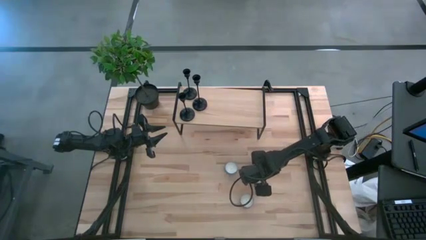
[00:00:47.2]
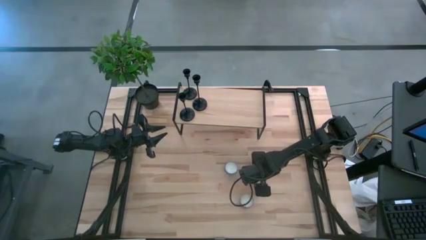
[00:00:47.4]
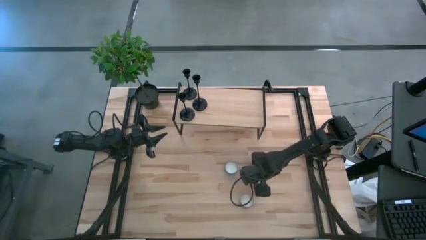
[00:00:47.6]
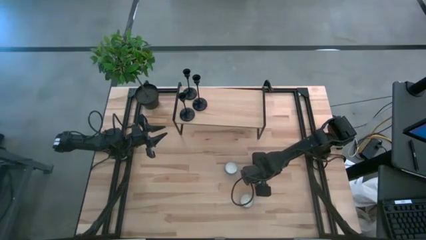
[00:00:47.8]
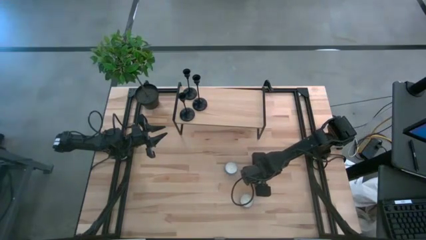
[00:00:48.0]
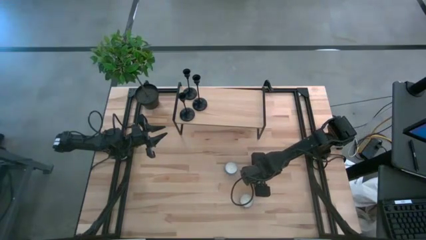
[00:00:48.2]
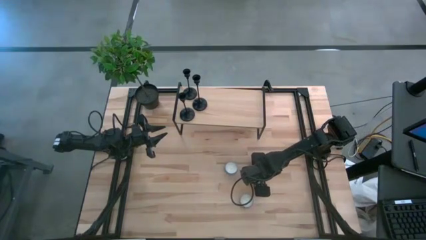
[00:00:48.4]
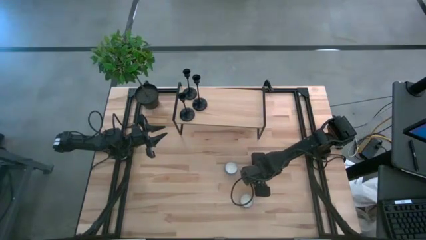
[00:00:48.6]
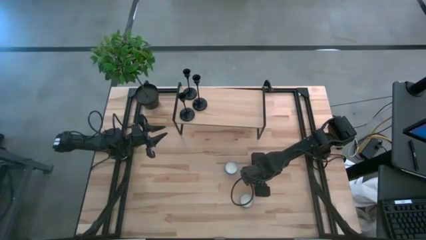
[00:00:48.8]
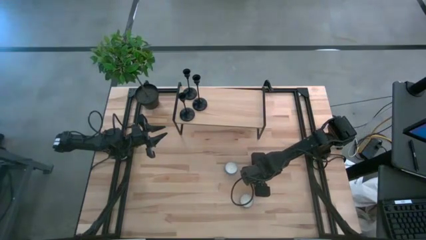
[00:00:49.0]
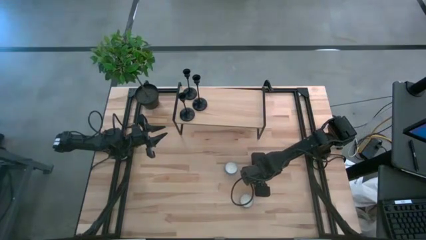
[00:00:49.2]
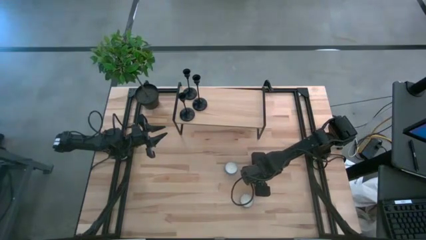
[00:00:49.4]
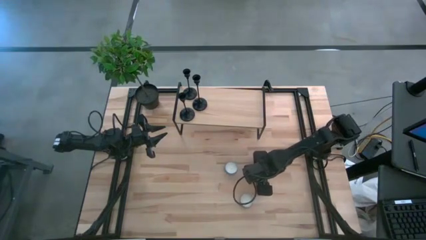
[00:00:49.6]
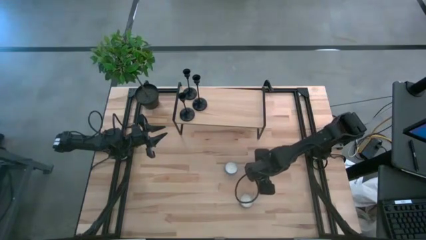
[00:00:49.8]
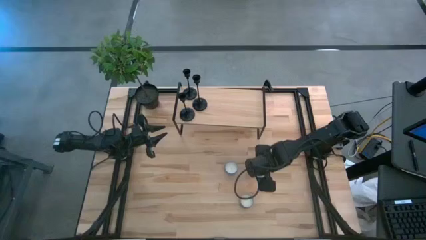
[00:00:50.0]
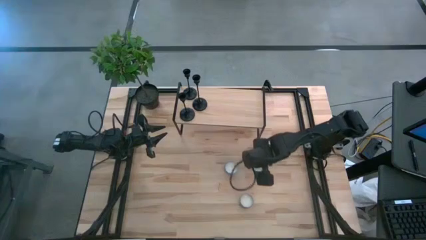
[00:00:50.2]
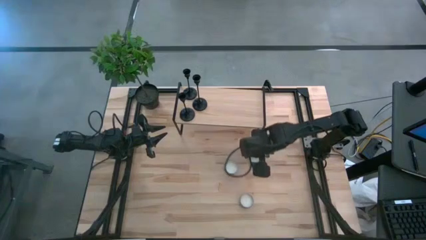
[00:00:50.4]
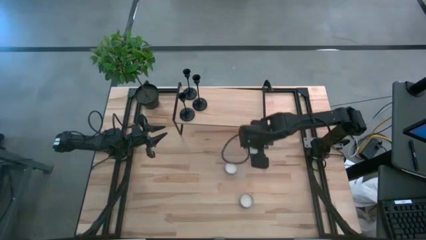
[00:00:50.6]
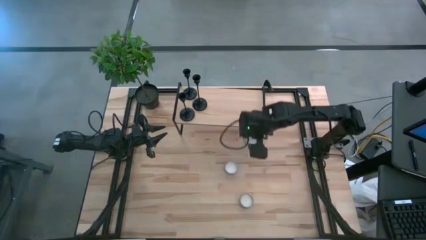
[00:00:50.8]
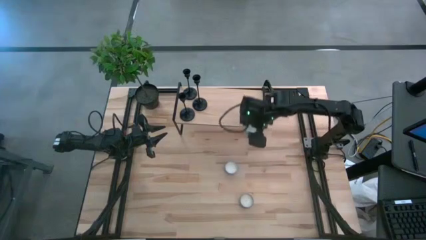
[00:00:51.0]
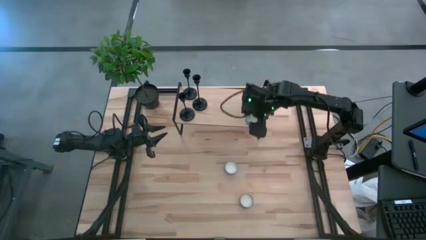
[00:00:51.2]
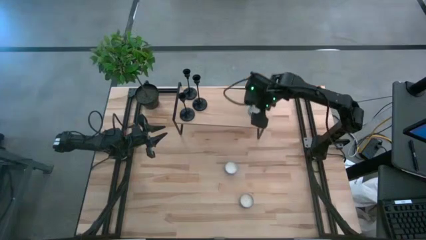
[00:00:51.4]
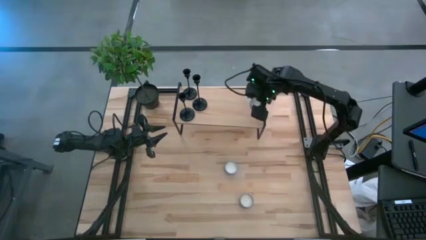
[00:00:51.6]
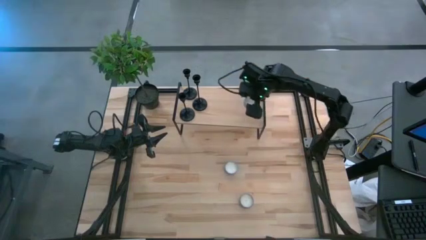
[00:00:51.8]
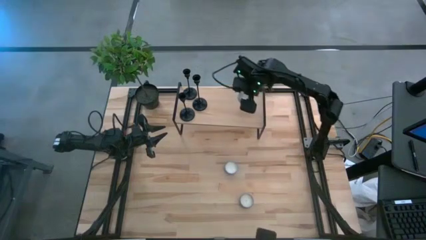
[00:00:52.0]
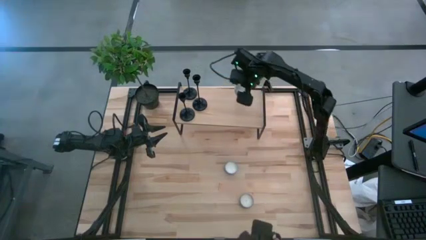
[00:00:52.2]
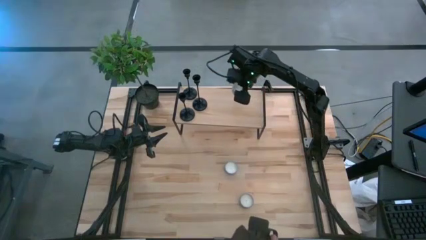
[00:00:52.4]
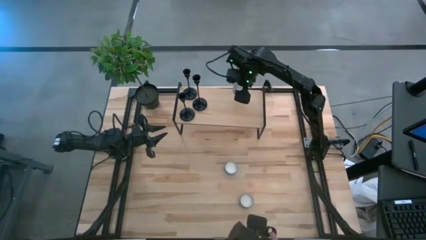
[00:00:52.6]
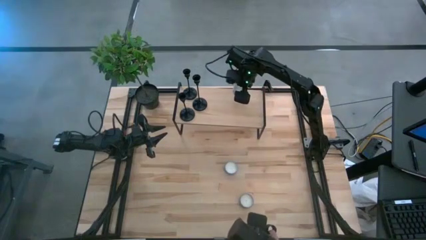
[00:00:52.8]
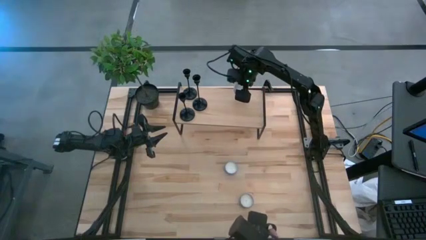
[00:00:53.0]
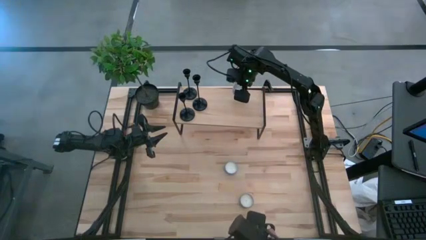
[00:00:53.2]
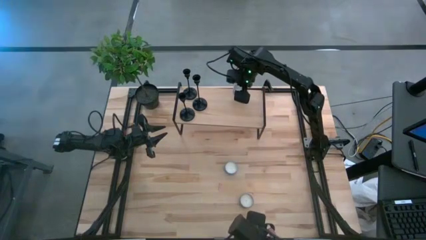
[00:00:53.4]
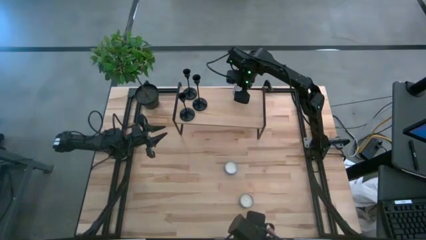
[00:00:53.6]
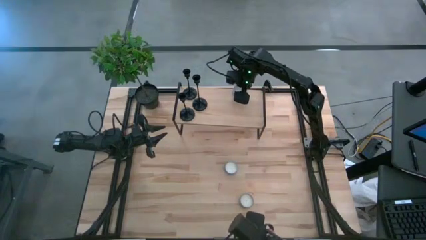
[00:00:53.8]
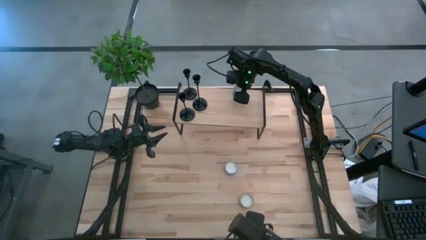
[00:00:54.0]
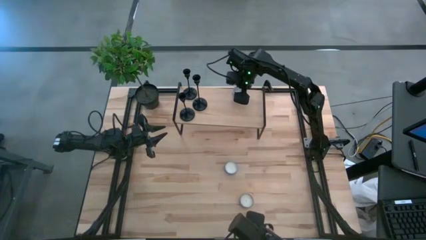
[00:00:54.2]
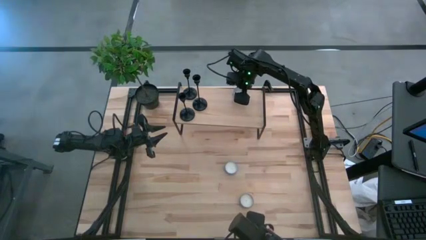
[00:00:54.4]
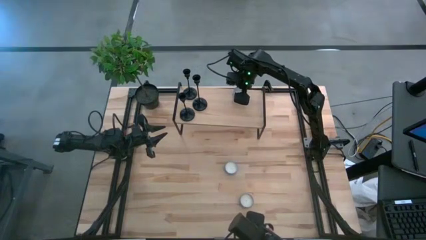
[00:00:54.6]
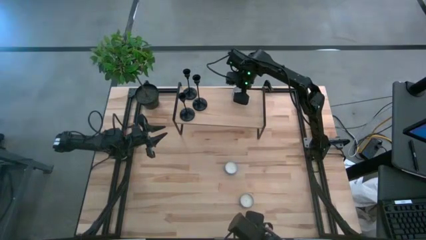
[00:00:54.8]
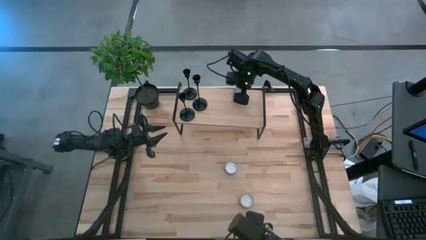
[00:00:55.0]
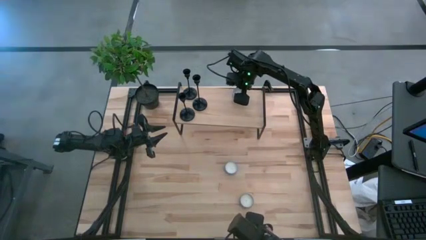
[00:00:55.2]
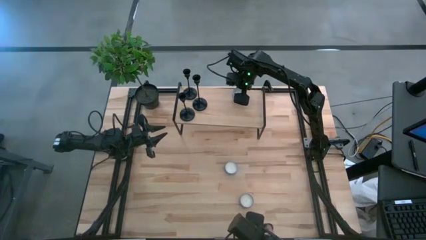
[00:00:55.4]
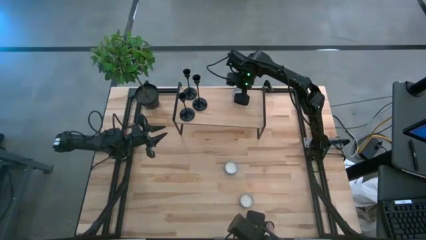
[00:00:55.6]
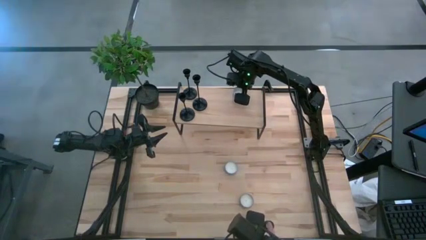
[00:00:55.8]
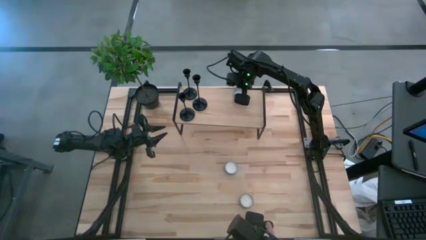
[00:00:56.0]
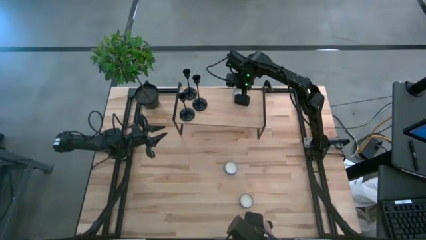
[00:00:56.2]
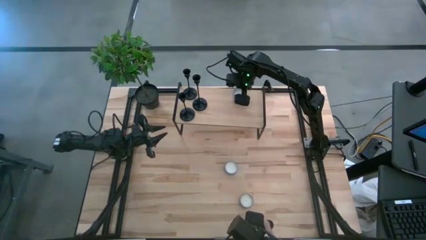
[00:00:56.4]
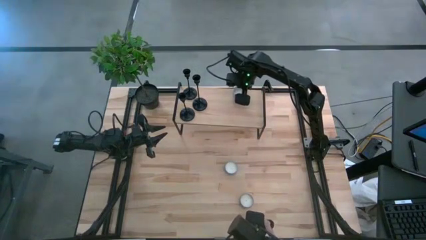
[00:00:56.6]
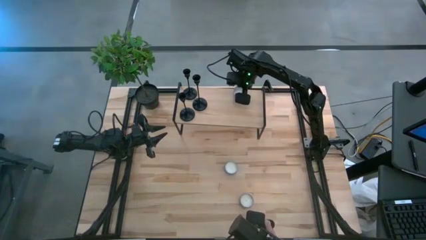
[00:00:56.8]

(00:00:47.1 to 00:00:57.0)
Task: Pick & Place candle stick holders
Put the red patterned scented candle on the shelf

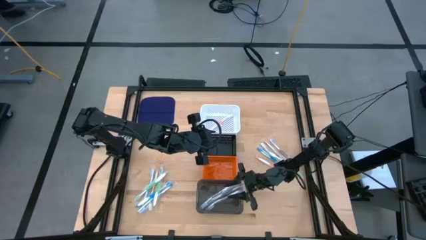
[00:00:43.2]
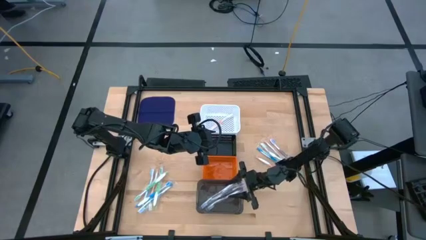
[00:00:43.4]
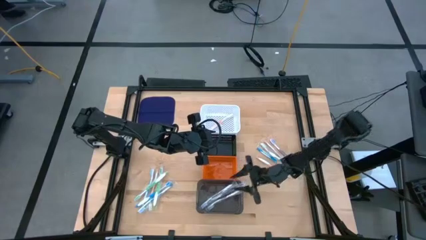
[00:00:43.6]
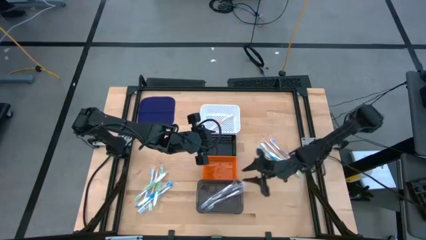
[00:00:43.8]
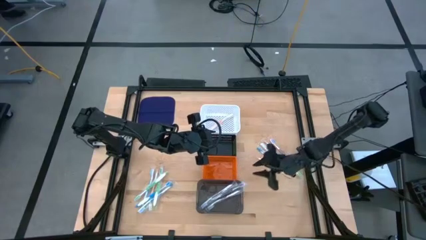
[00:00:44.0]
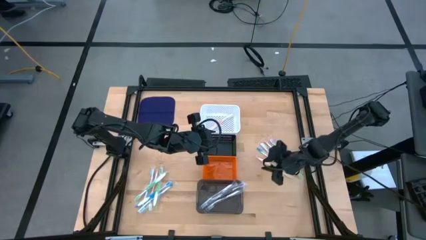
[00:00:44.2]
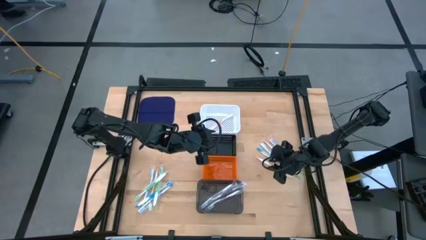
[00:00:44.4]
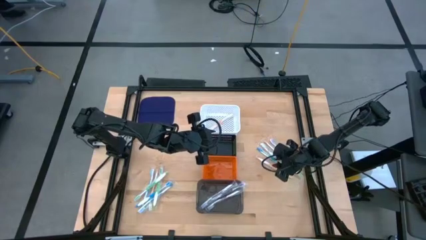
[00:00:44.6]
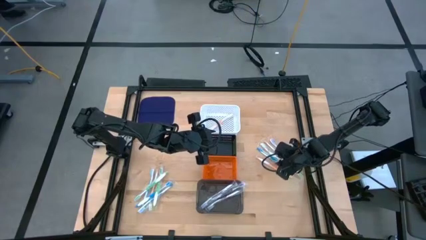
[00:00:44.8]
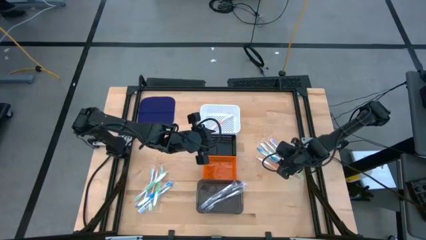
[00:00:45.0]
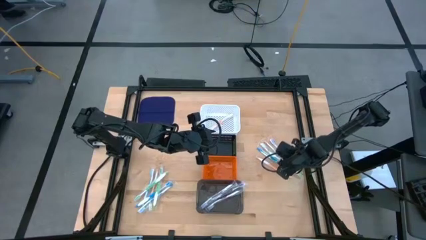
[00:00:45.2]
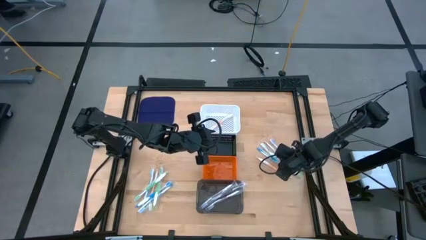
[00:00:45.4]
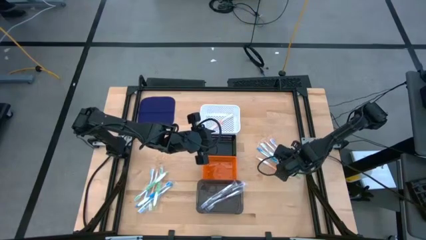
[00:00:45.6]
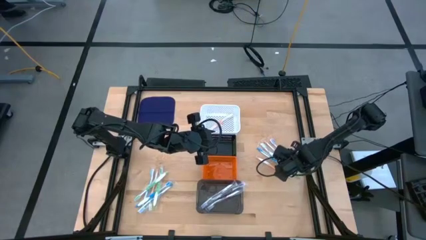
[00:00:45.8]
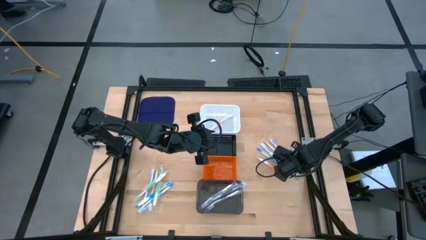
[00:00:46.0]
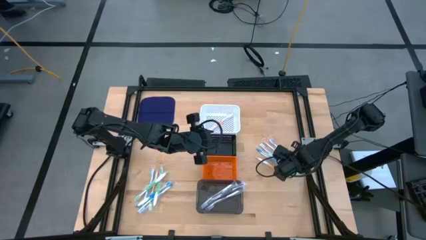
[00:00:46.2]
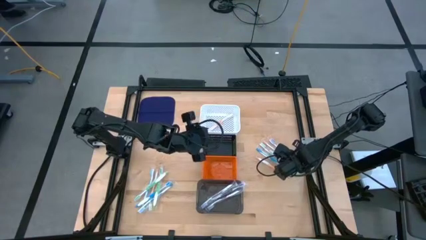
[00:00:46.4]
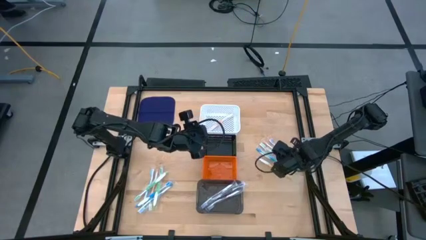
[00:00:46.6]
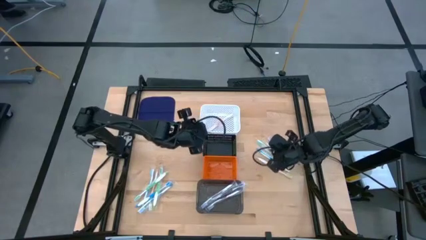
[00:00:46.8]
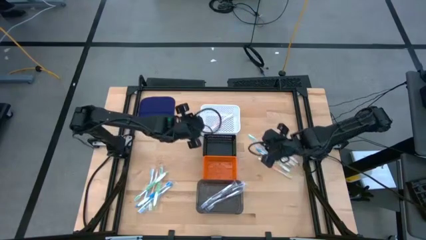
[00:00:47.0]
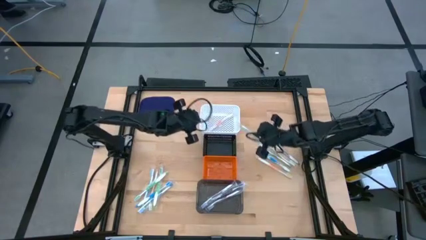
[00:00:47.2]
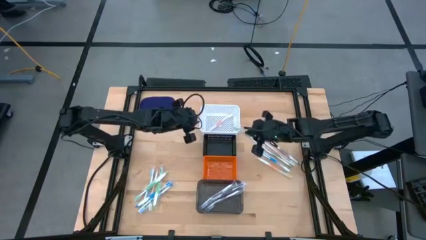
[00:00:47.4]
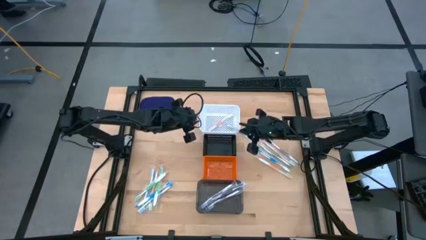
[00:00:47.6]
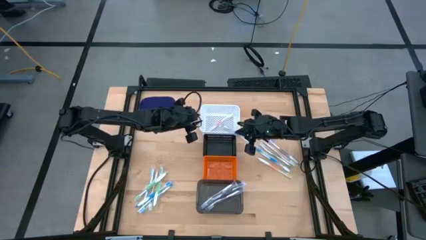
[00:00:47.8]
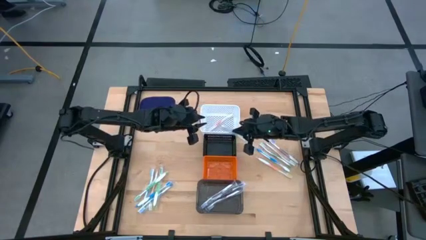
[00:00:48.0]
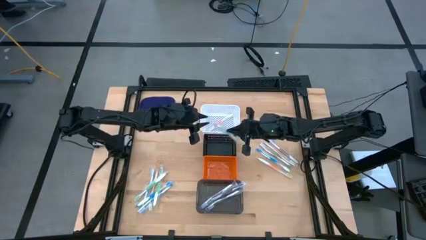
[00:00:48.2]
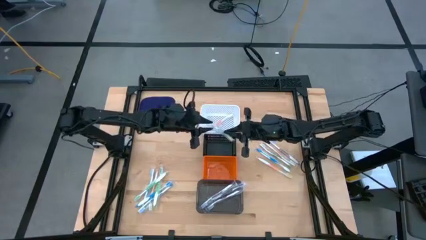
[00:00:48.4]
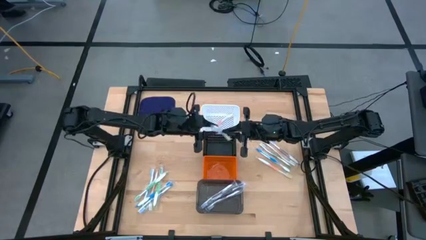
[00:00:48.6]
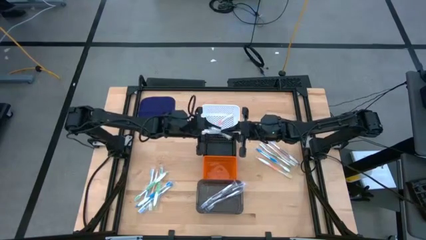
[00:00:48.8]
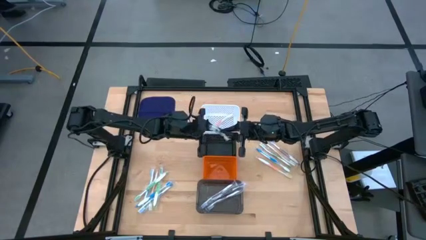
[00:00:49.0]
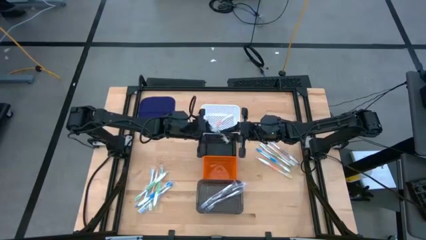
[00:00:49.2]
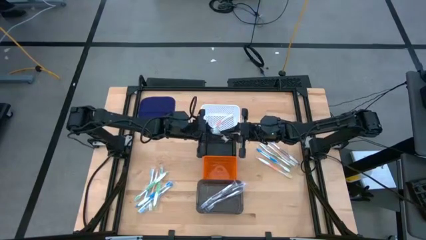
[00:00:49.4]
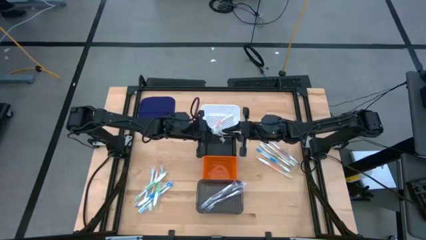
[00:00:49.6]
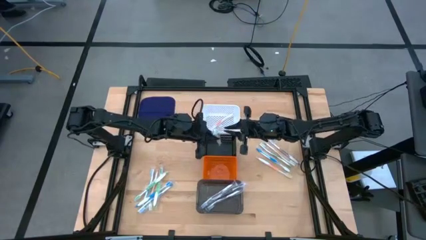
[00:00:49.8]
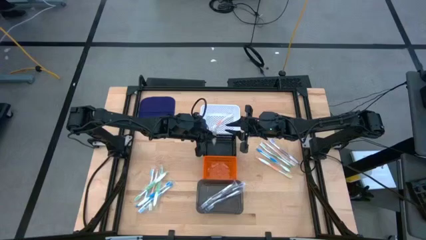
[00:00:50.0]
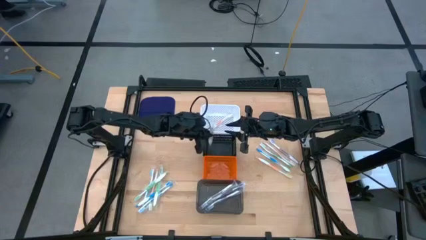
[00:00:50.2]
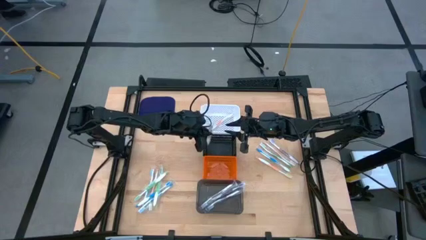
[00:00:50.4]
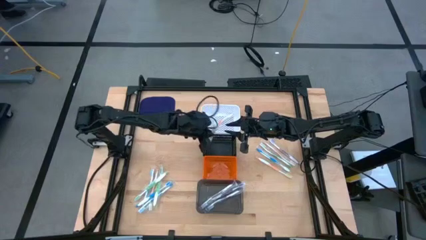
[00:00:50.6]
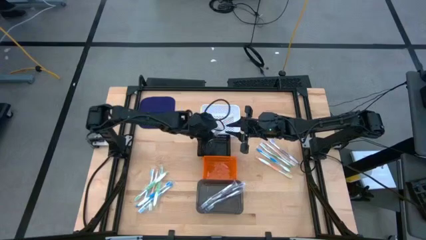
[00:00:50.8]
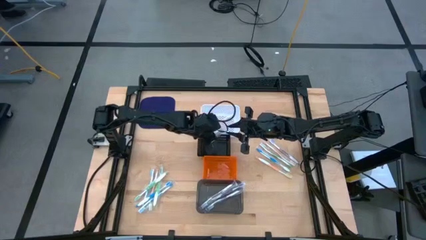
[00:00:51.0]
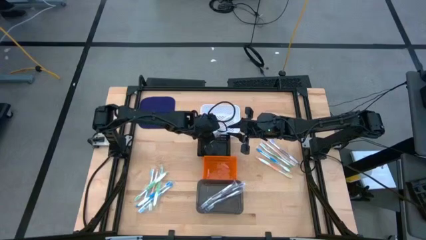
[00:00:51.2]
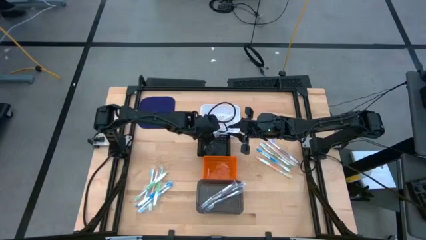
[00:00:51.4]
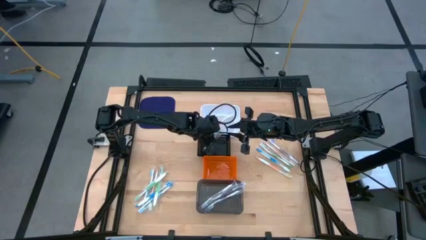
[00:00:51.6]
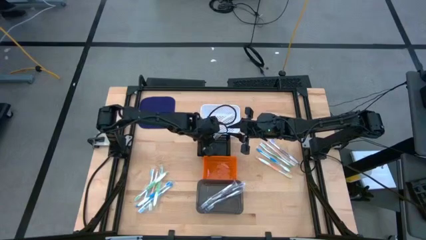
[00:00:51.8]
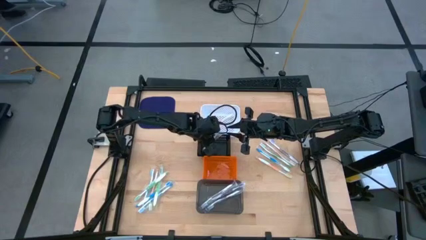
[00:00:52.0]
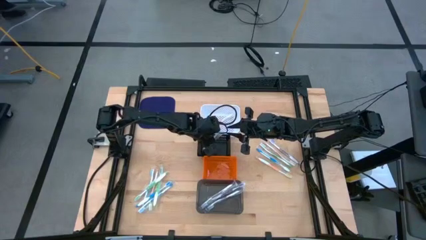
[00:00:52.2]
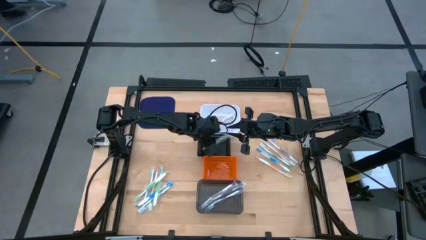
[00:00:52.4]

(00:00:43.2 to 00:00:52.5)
Task: Pick & Place Toothbrushes
Put the green toothbrush into the black basket
